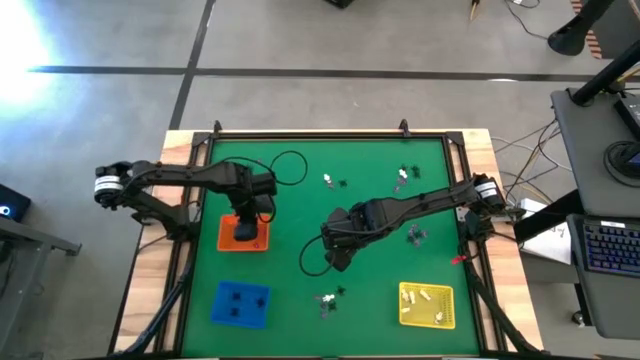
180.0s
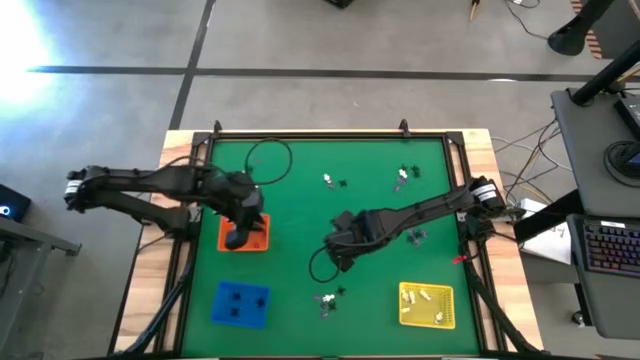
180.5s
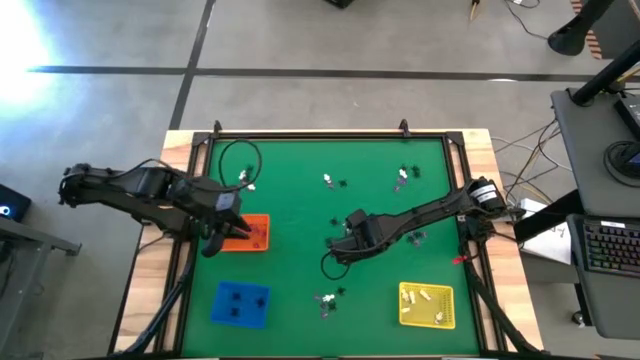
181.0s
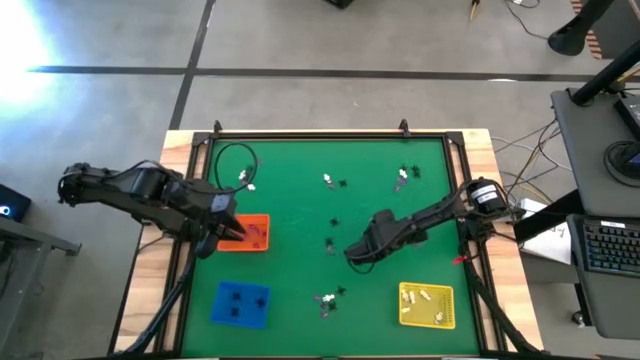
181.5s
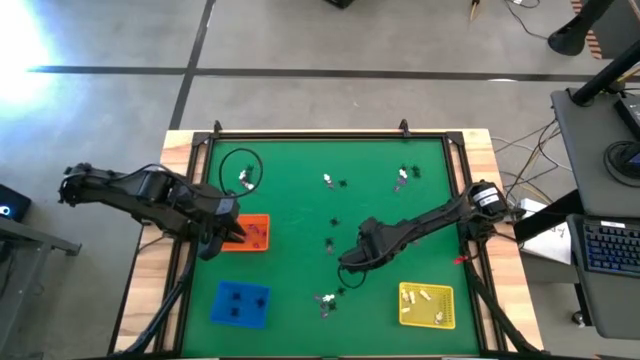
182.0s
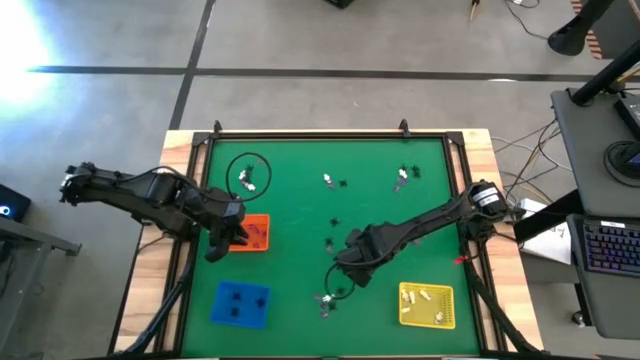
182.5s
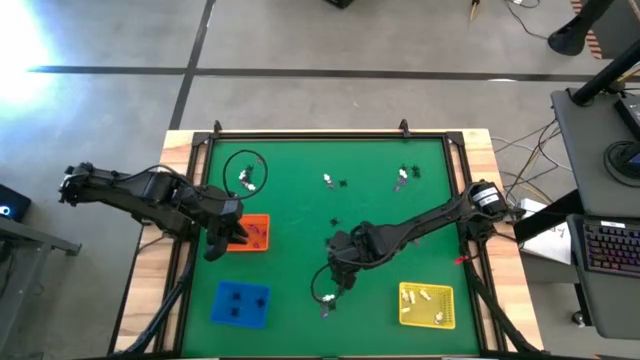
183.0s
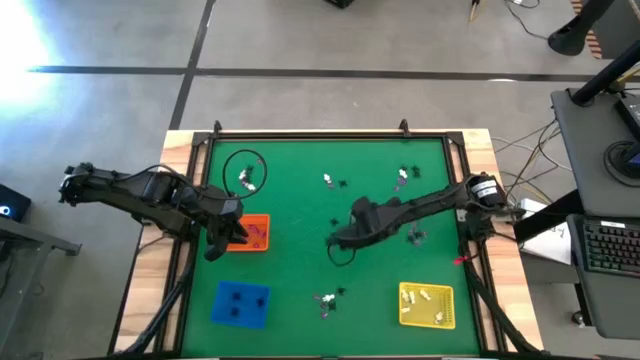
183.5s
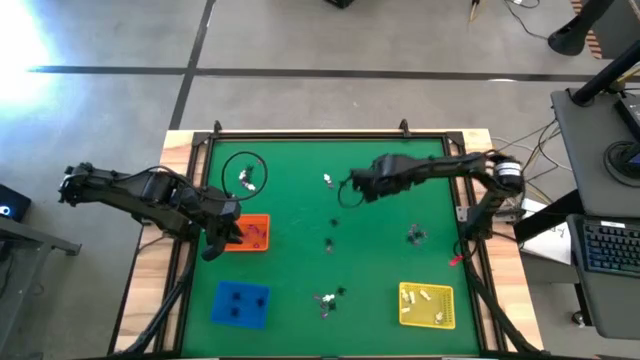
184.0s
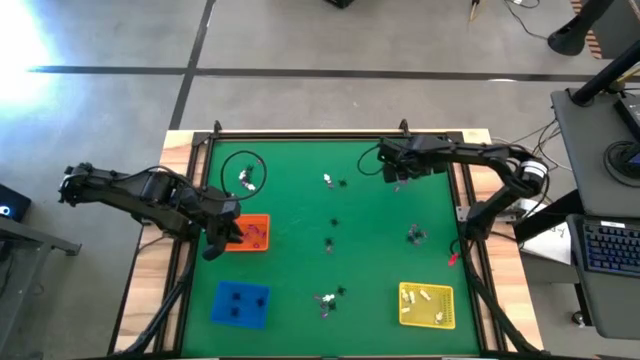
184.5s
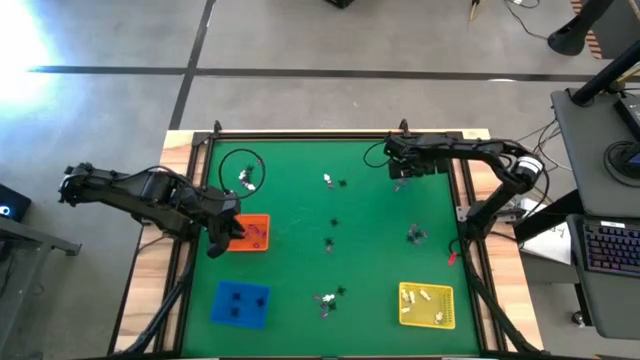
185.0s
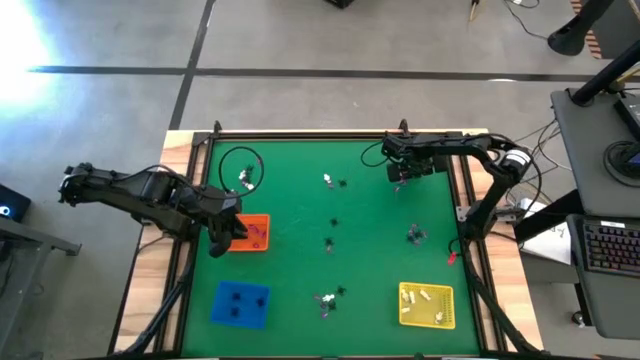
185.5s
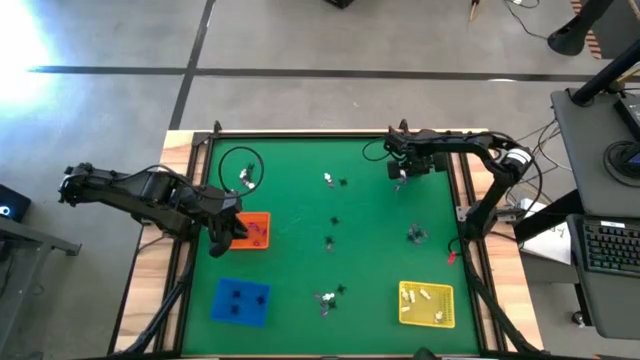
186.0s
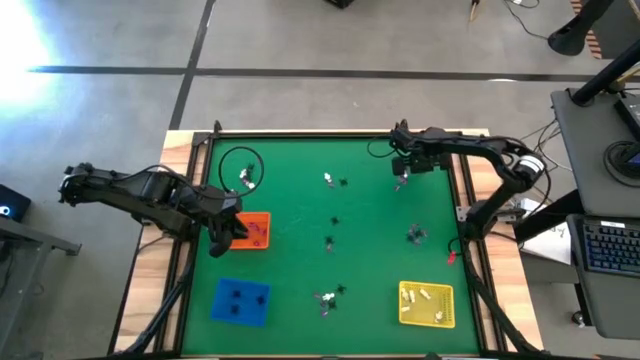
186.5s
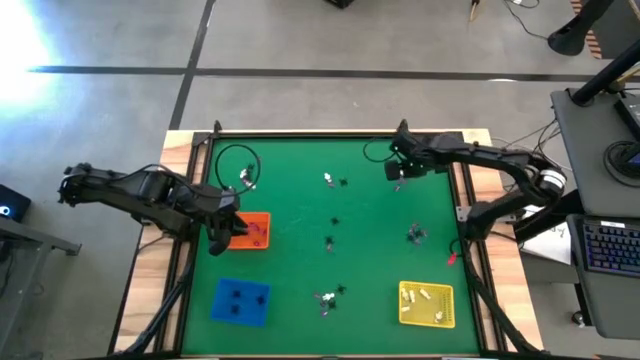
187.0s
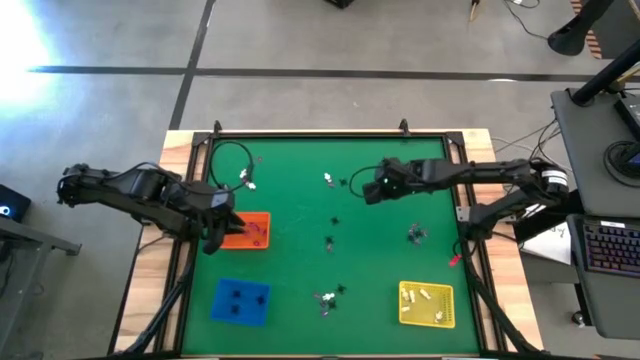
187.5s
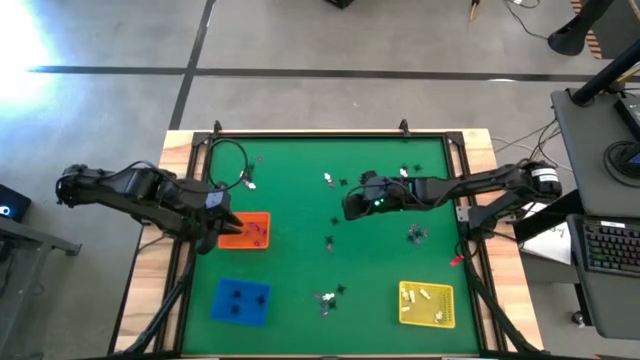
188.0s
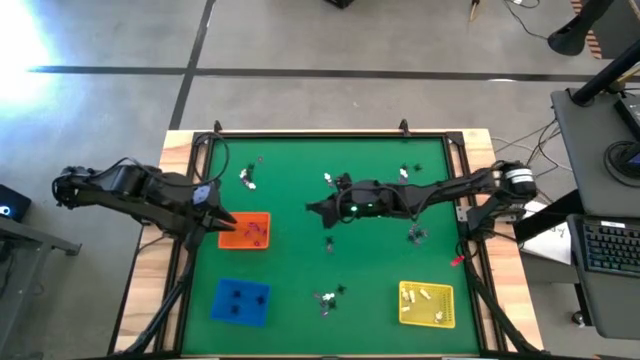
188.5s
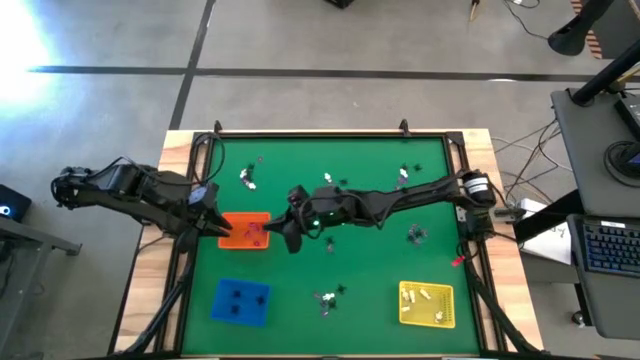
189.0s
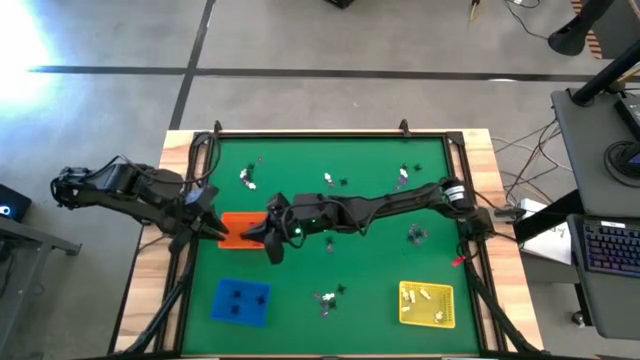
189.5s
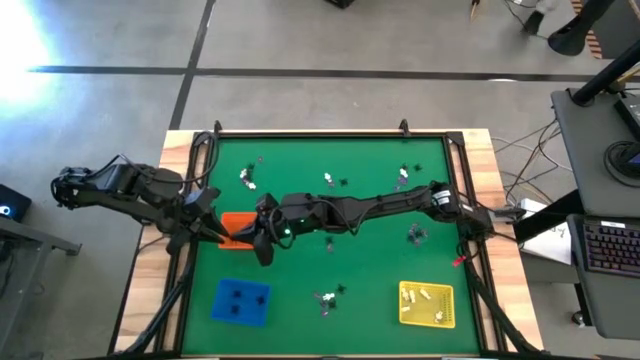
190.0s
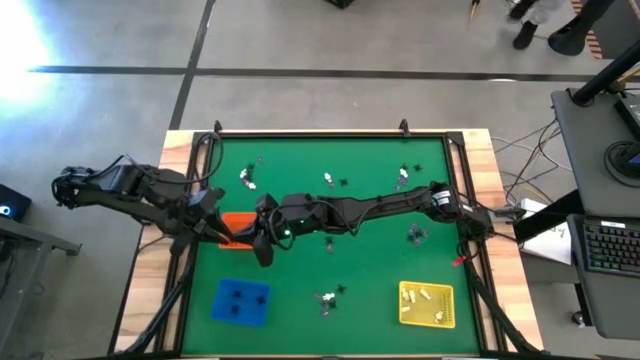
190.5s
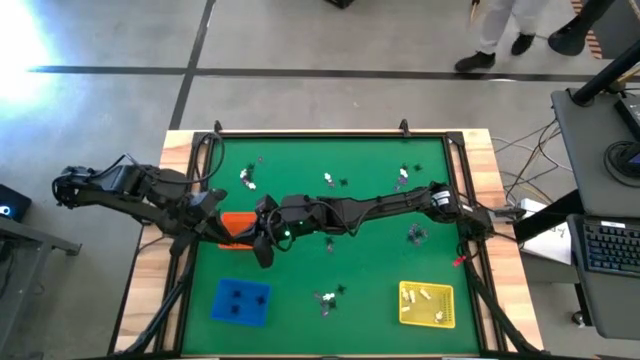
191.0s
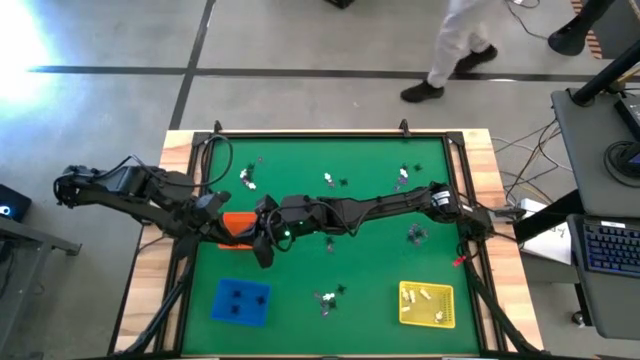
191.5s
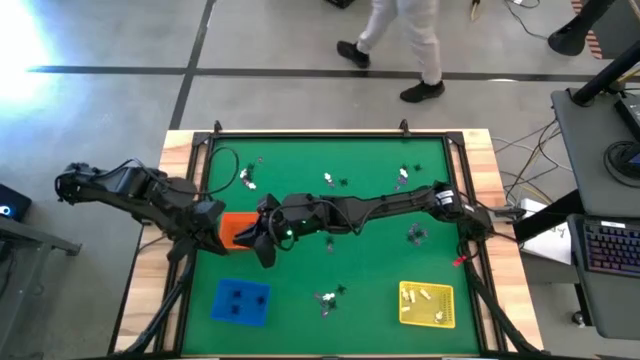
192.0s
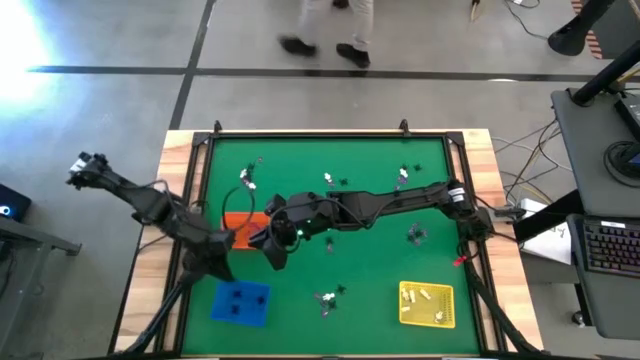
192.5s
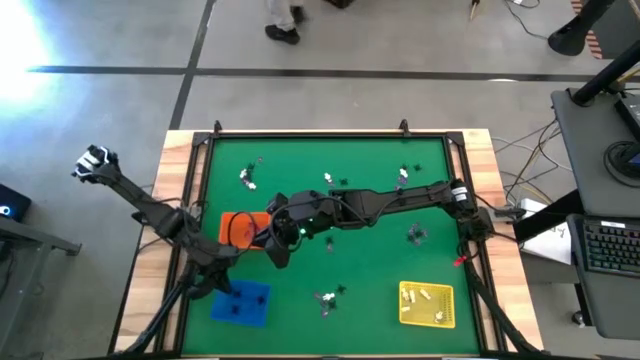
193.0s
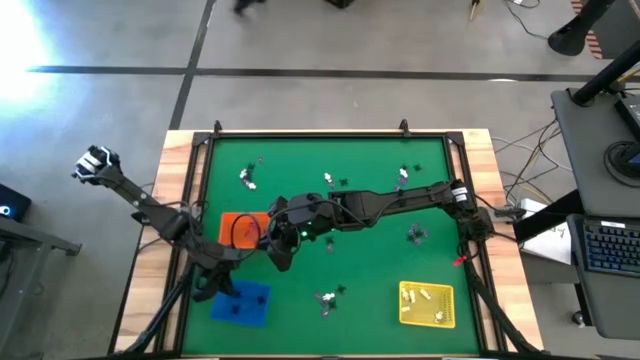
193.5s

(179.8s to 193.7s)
Task: Sort Halloween decoration
Put the black spider toy into the blue bin

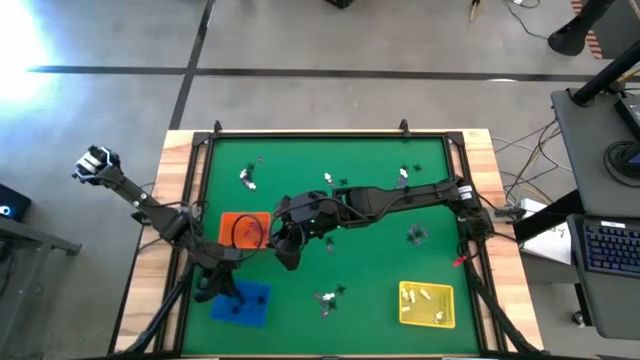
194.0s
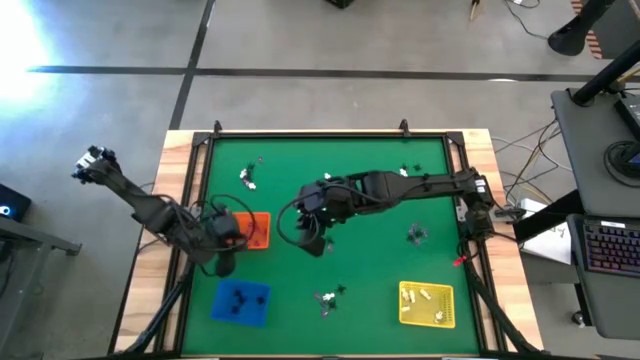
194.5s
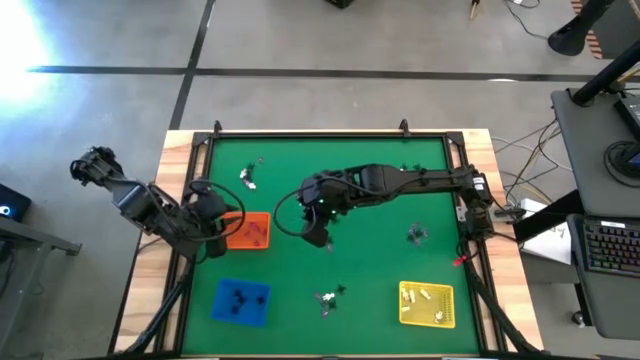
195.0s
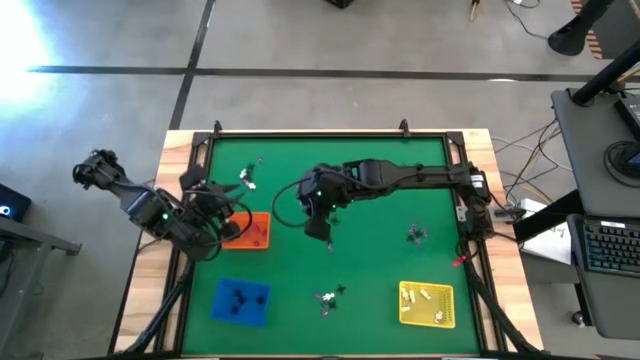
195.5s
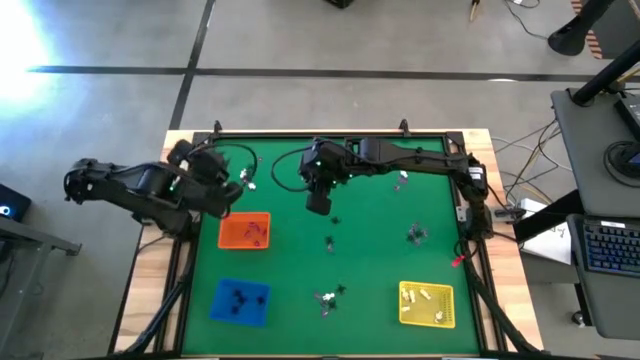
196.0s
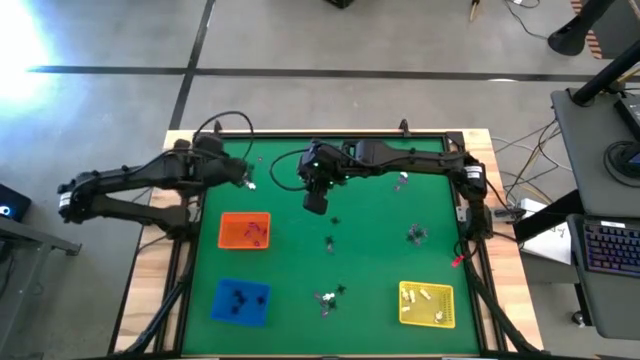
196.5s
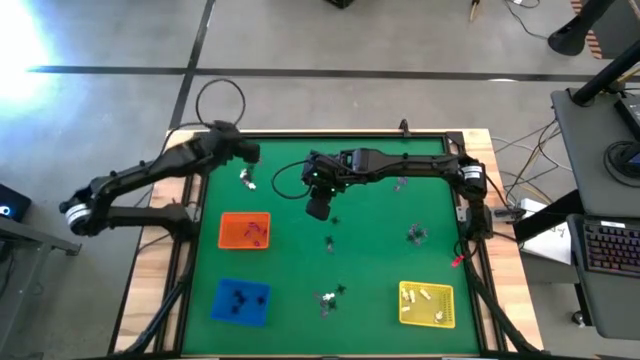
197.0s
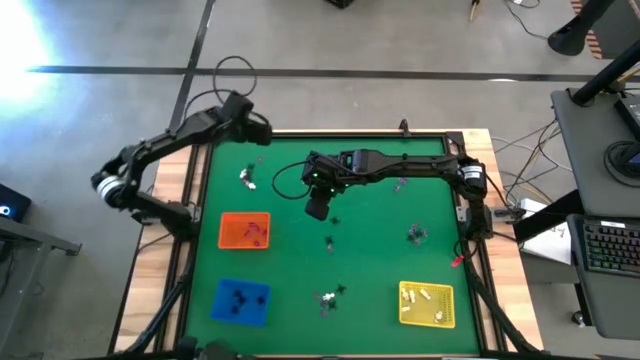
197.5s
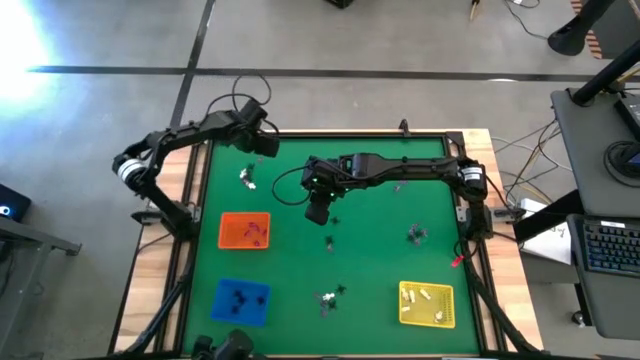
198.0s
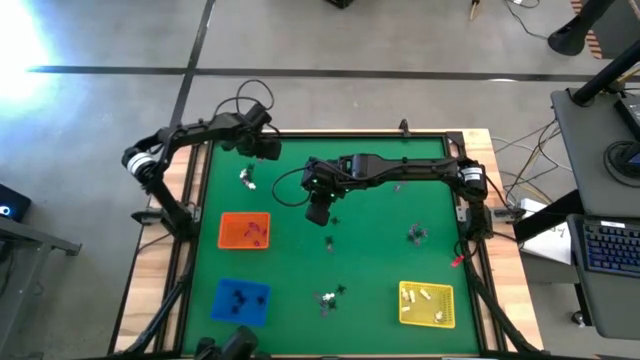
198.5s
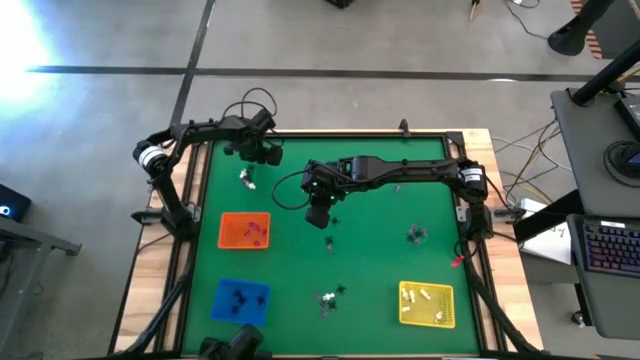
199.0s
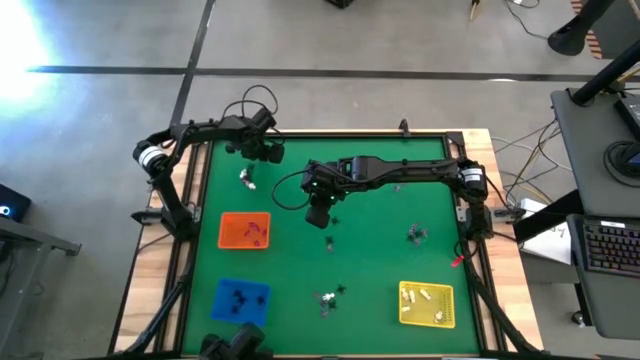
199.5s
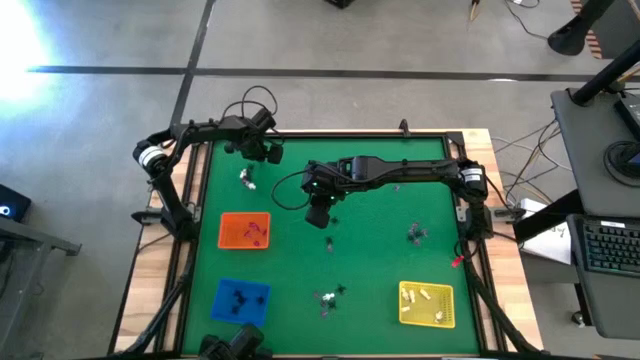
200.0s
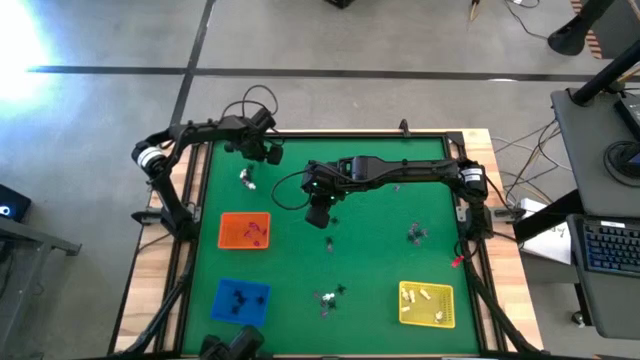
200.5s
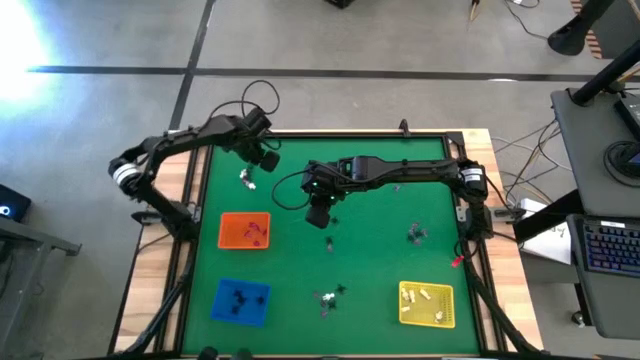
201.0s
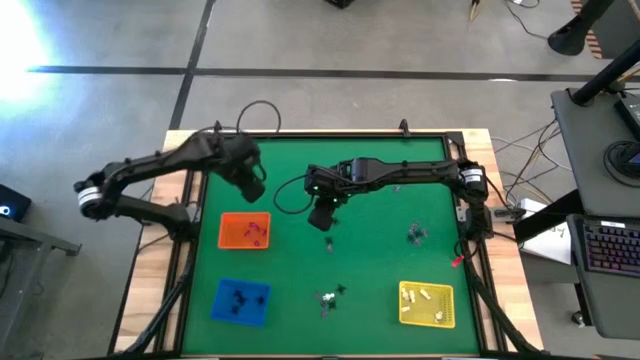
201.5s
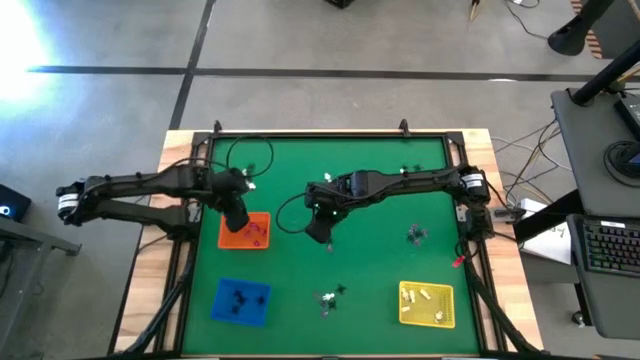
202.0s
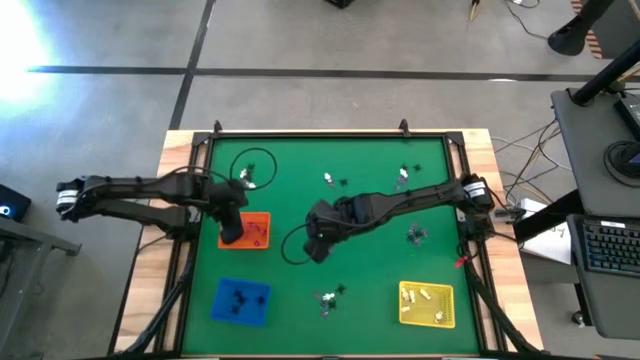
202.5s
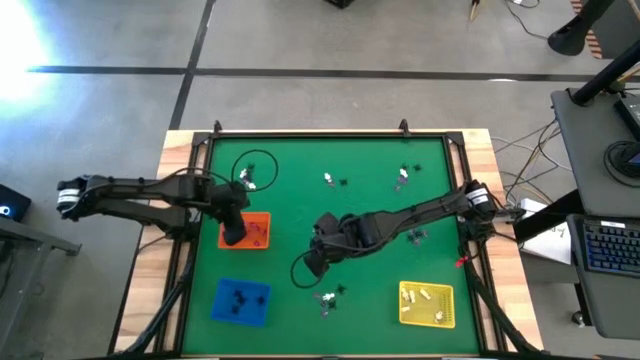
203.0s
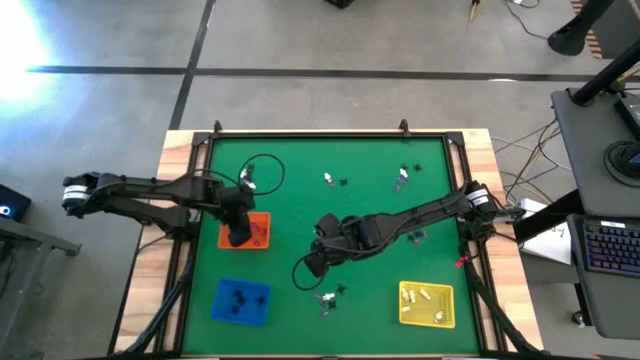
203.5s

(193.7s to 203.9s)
Put the violet witch hat toy into the orange bin
